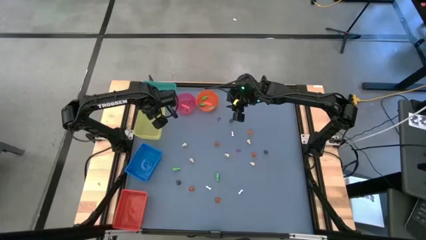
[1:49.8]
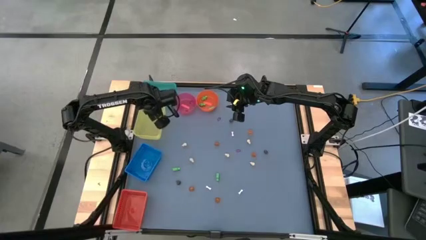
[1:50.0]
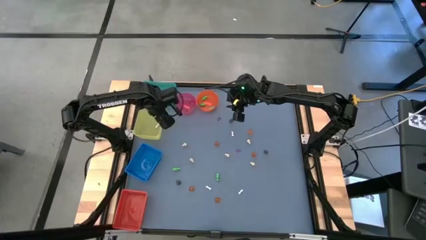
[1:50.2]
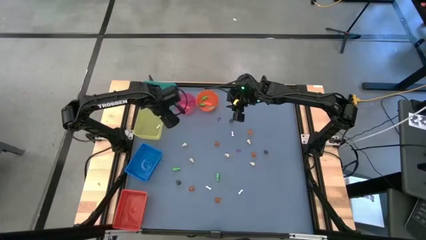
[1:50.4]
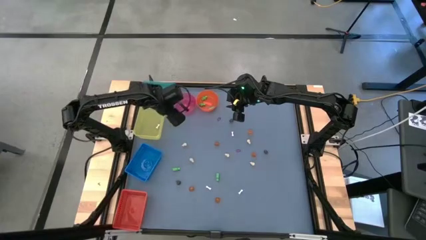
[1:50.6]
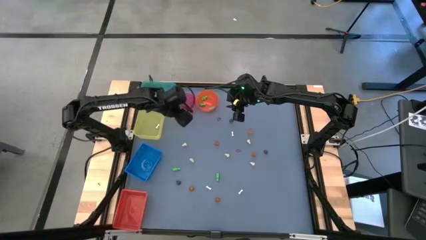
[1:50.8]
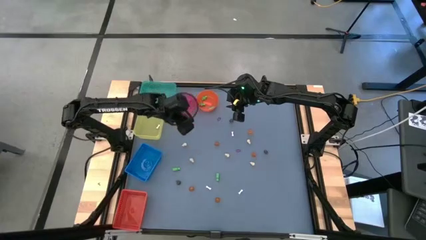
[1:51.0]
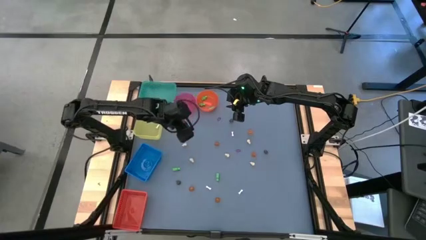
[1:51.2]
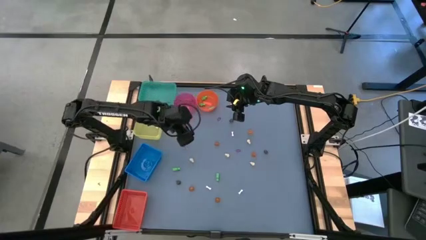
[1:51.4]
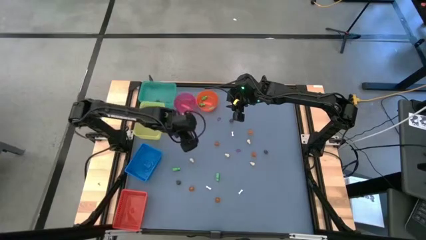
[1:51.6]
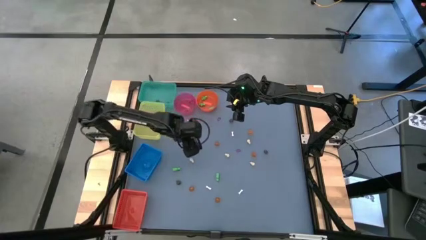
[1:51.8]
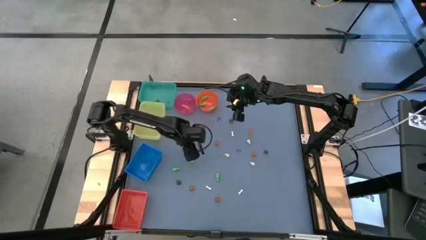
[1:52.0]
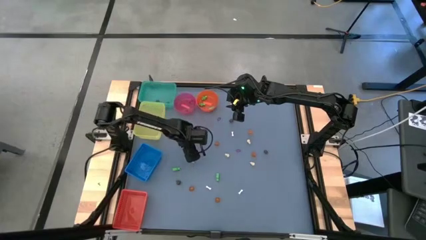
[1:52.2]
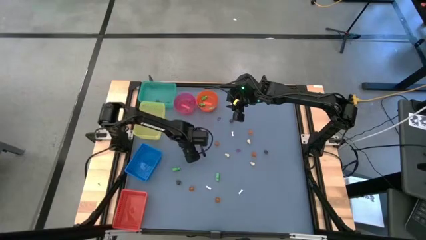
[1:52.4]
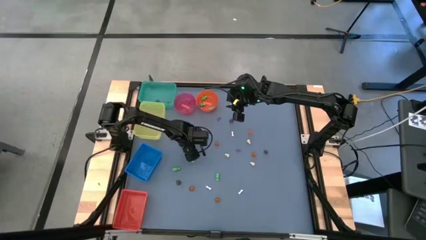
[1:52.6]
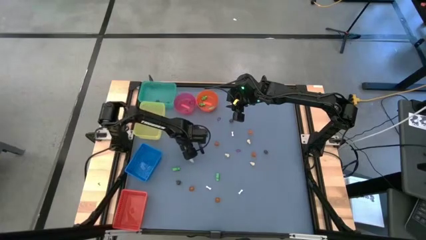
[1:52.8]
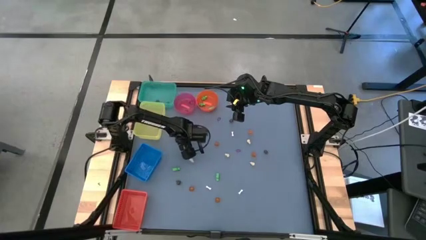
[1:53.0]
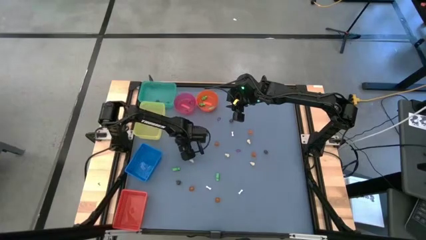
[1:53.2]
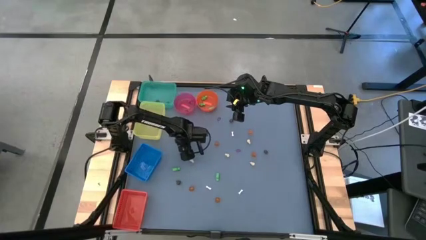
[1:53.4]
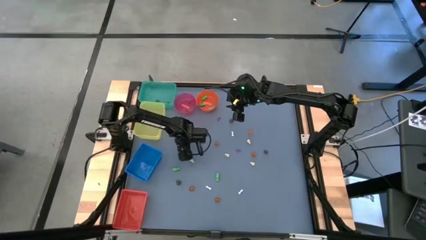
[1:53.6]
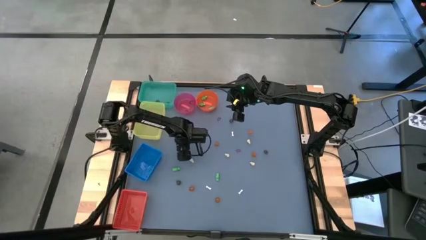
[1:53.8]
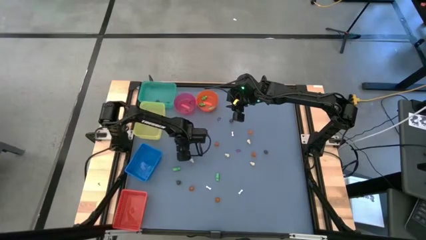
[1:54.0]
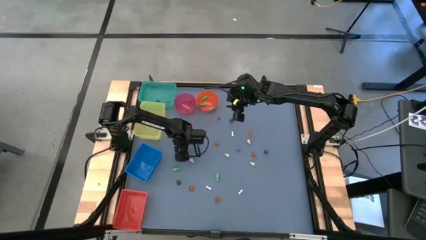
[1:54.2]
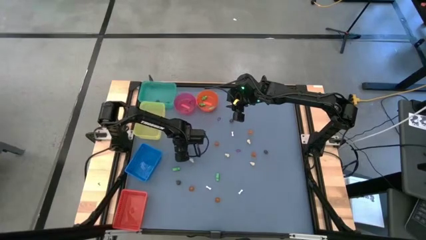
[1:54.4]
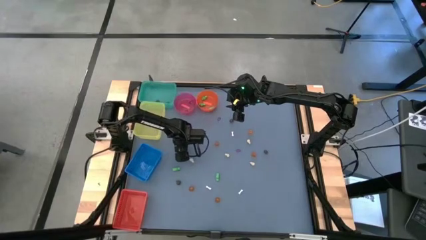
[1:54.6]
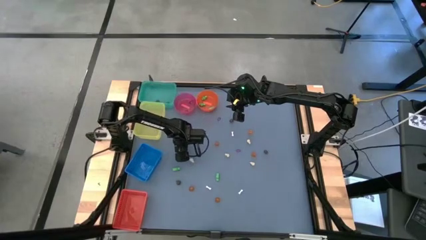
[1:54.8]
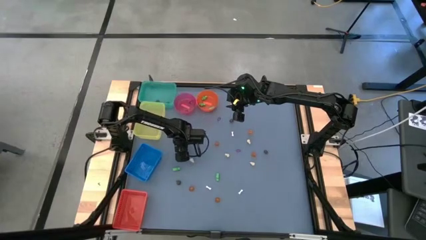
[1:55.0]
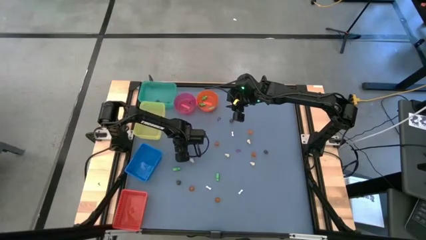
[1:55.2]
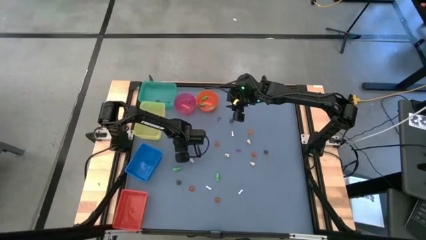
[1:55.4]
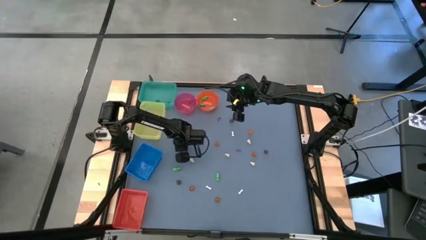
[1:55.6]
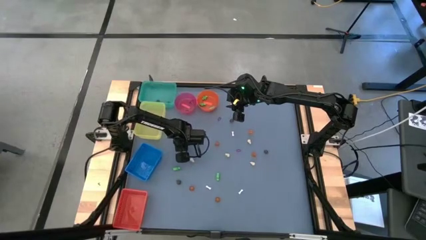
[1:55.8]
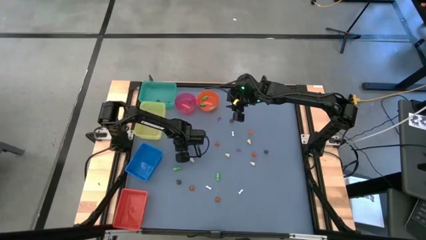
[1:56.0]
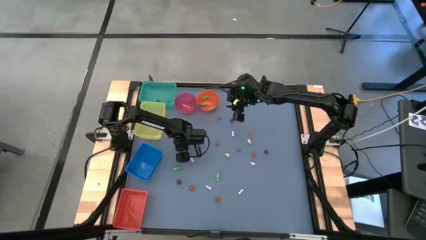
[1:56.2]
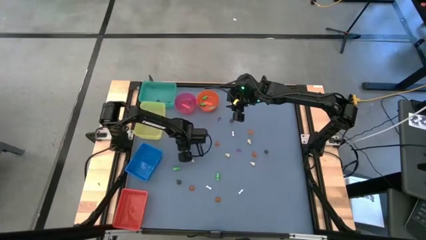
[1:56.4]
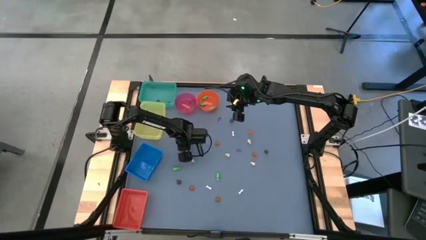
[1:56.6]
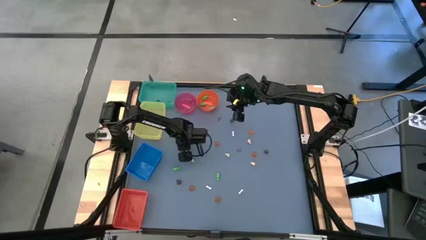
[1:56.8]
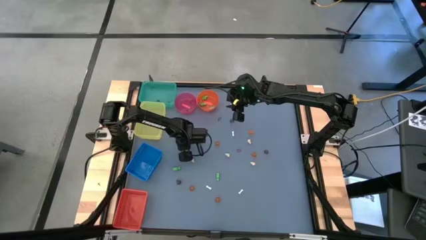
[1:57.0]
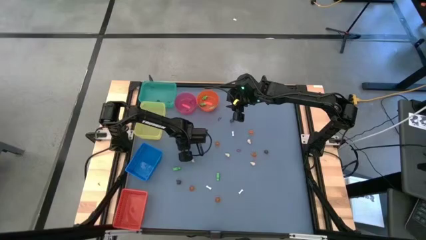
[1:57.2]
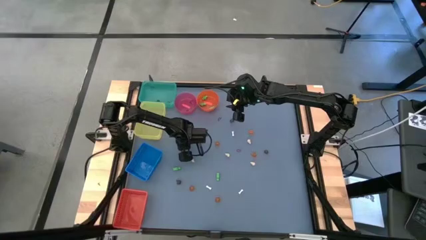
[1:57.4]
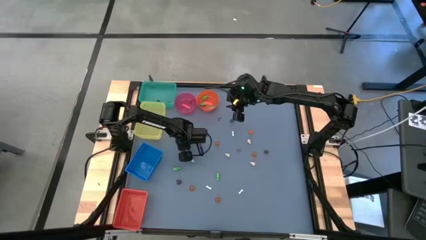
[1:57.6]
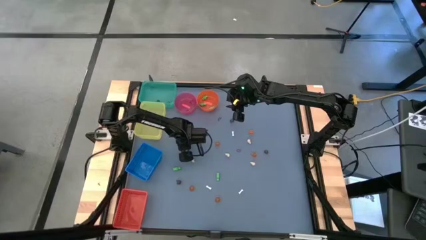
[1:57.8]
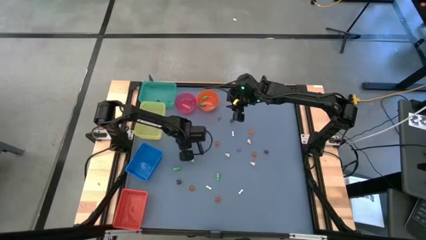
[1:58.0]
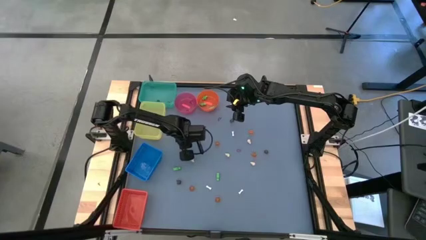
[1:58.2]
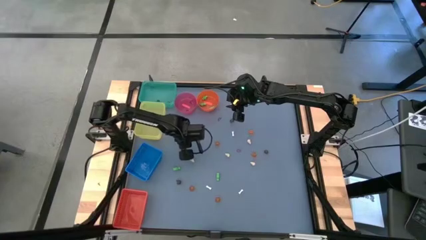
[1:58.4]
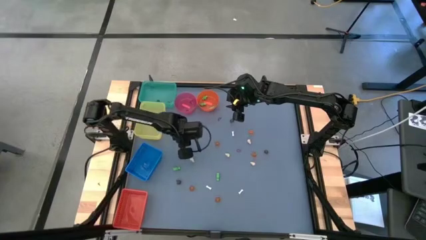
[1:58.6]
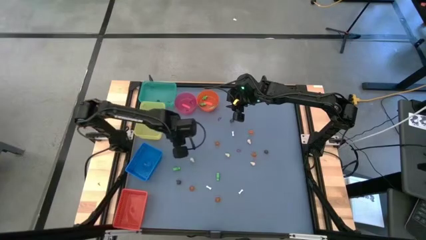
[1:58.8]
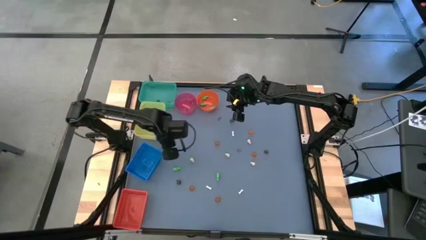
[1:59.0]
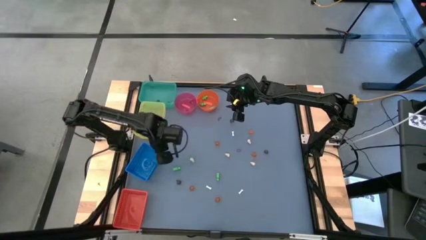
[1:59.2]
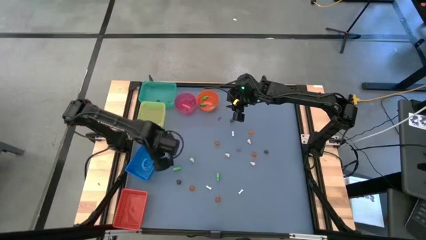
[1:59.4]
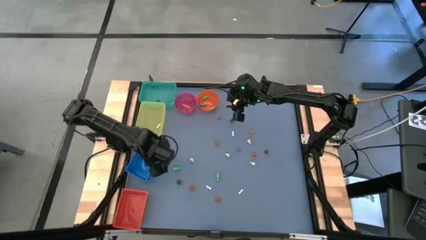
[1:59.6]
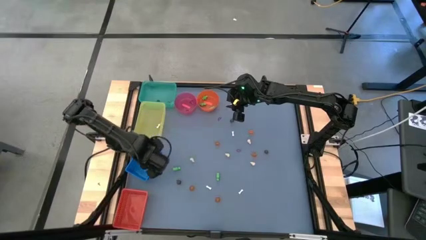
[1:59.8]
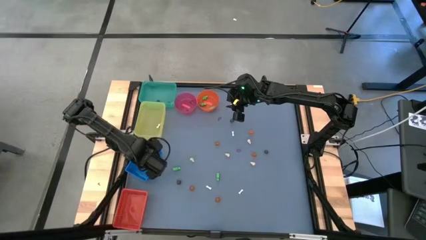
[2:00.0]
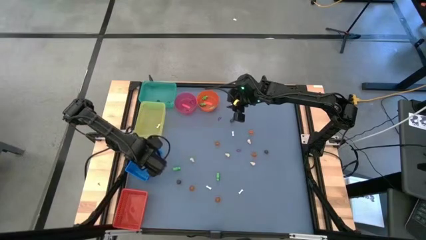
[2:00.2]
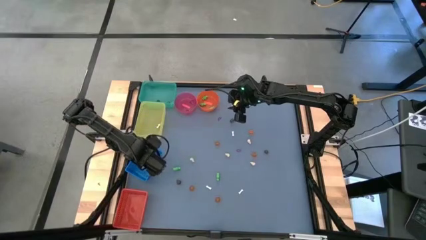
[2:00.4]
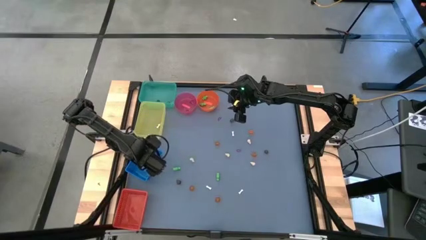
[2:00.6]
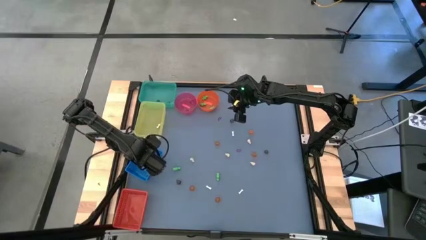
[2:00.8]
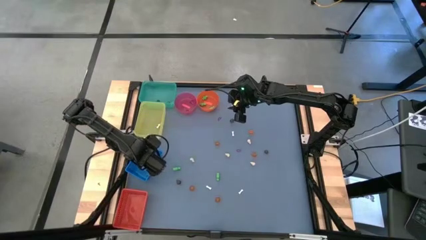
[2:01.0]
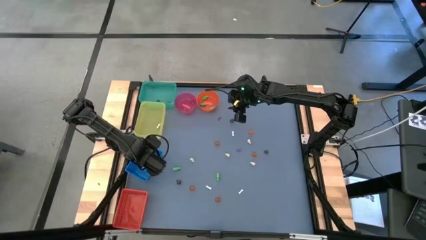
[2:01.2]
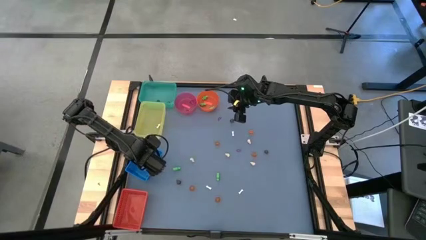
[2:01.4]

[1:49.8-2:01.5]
Task: Sort Halloween decoration
Put the yellow skull toy into the blue bin
